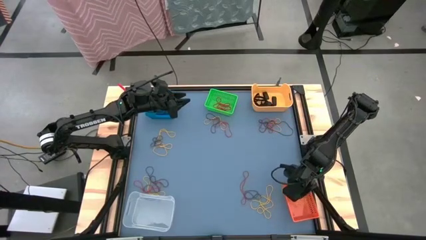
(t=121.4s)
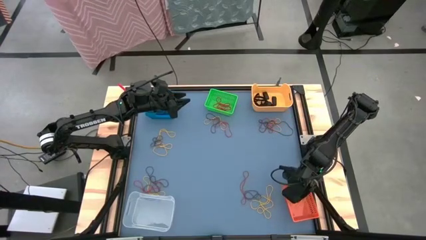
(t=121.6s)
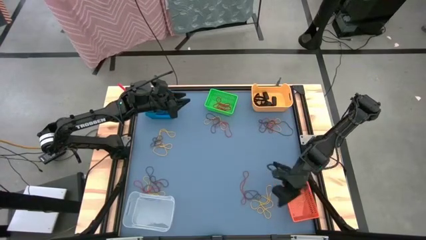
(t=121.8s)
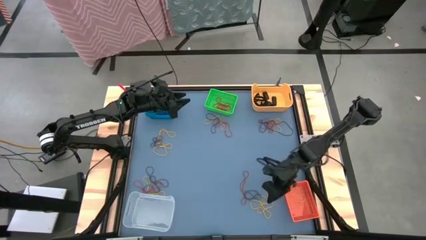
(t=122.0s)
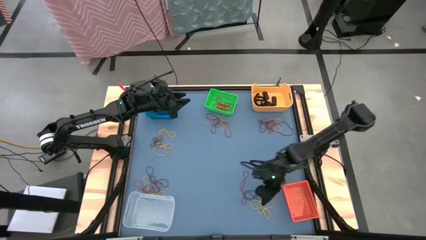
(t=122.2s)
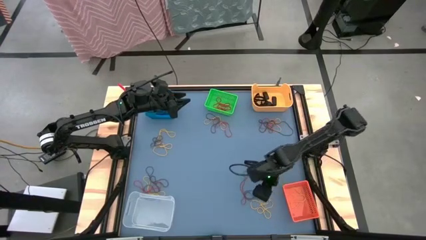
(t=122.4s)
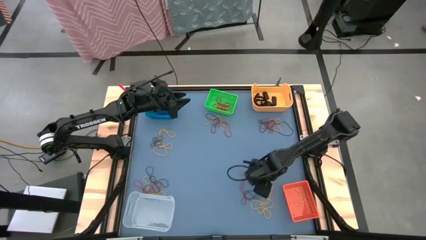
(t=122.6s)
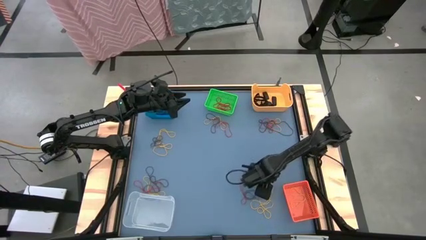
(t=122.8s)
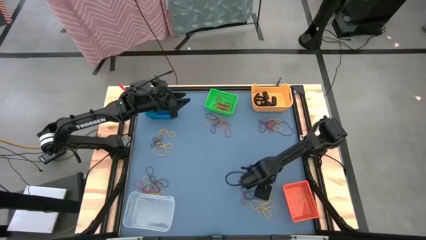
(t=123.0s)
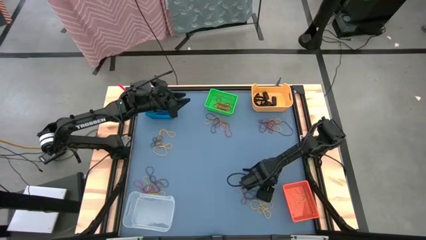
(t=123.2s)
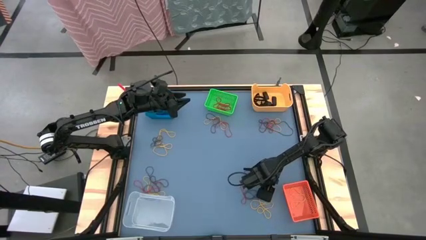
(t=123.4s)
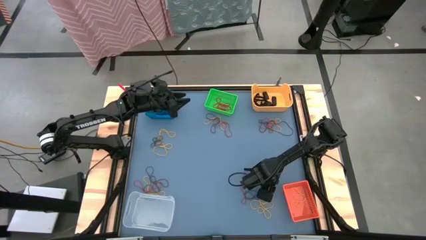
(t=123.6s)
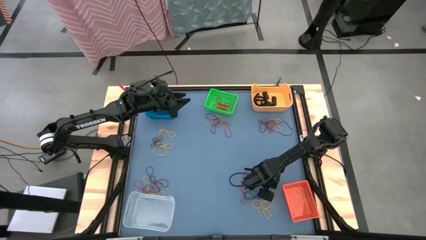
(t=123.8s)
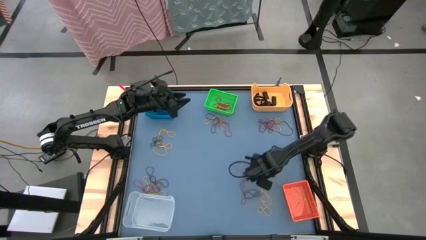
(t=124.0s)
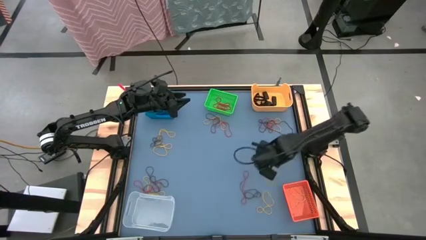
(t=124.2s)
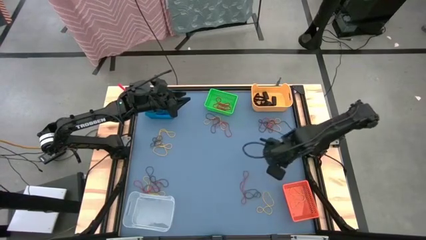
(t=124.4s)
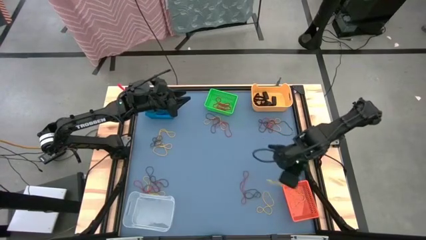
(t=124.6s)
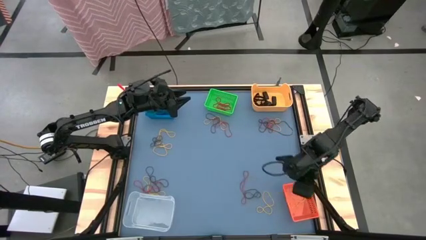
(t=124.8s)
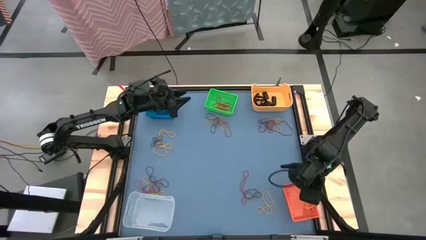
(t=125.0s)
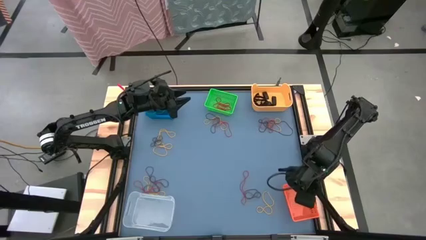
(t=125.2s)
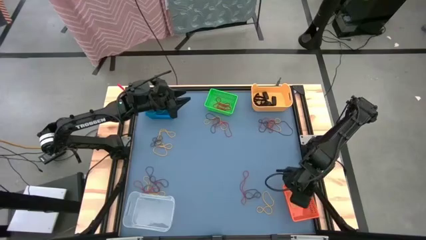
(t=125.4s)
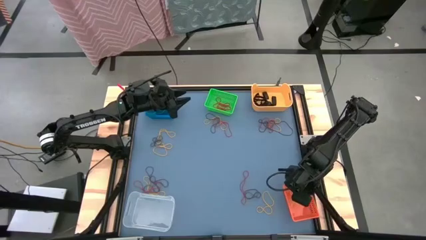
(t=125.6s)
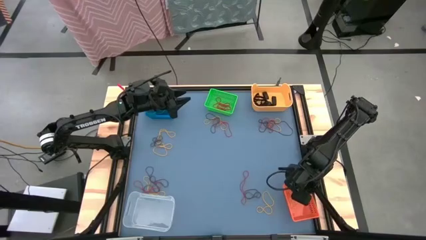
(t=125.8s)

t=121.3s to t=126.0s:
Task: Sort rubber bands into baskets
Put the yellow rubber band into the orange bin

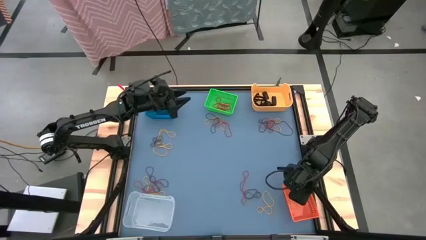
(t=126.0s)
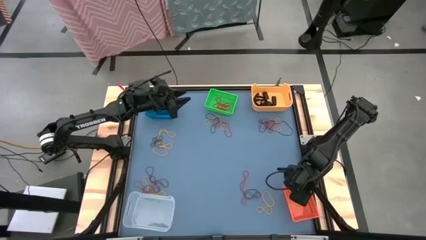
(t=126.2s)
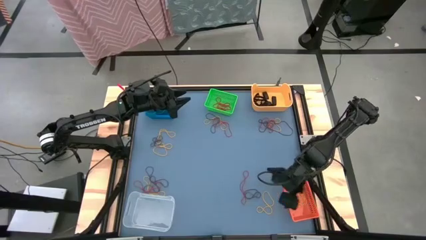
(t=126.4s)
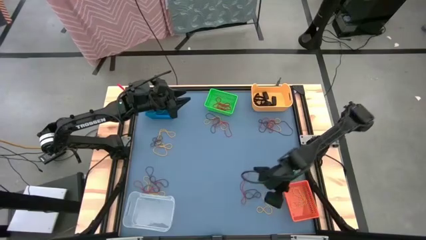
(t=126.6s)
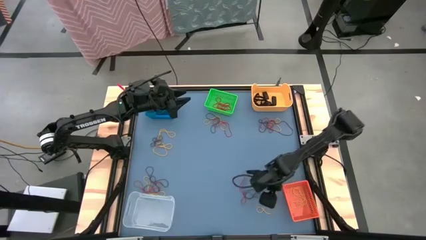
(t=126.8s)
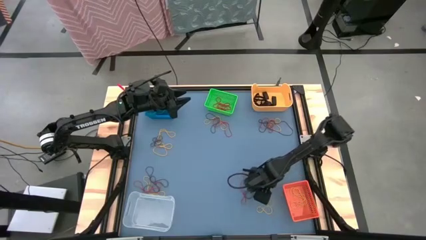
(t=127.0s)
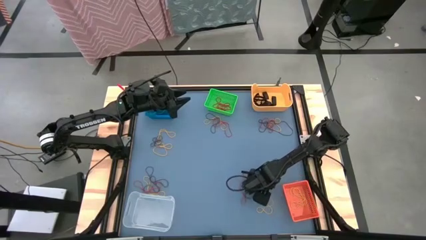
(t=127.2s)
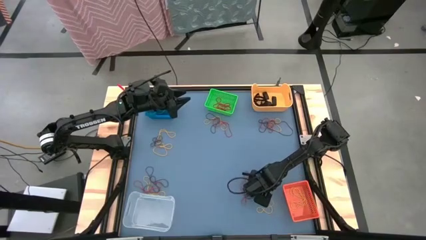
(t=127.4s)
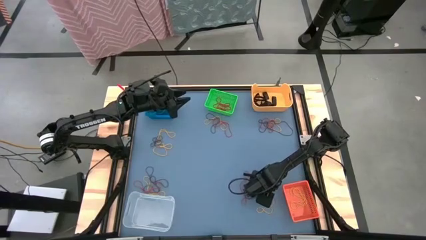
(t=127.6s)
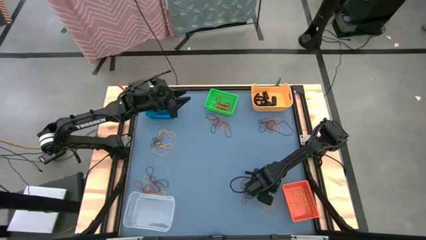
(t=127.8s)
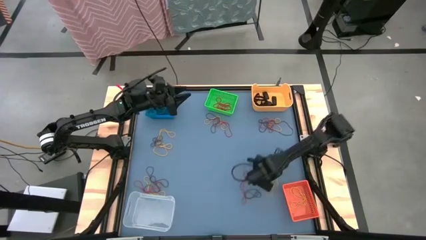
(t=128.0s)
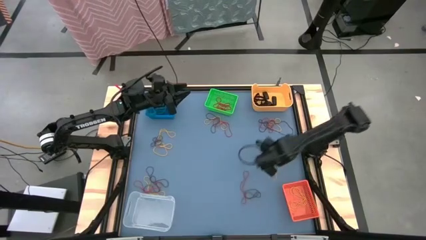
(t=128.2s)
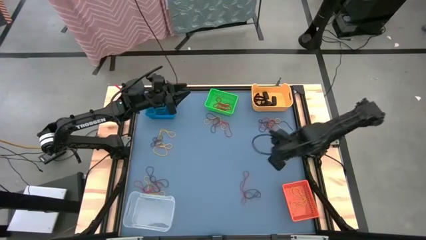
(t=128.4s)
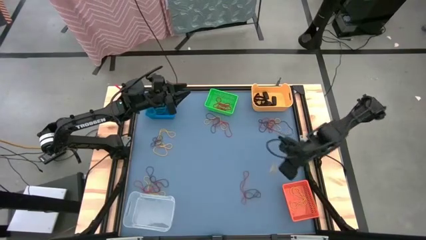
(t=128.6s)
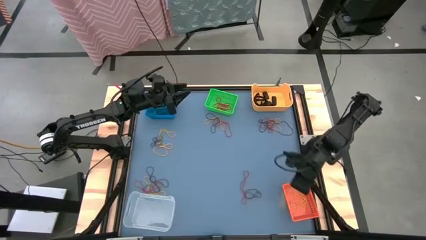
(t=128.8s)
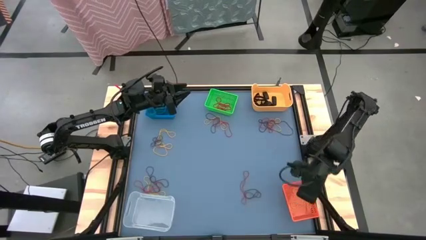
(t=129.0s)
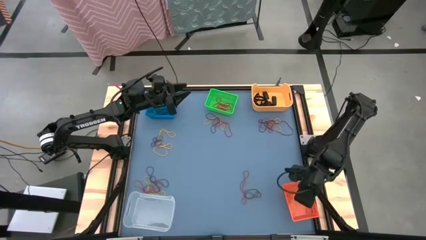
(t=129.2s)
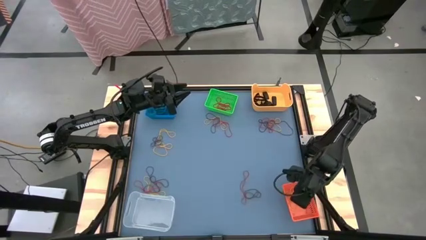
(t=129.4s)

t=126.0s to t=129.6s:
Put the yellow rubber band into the orange bin

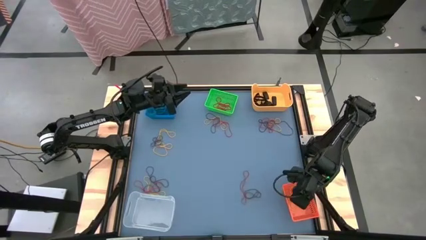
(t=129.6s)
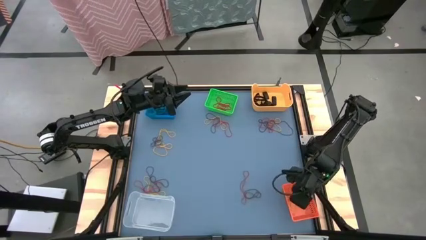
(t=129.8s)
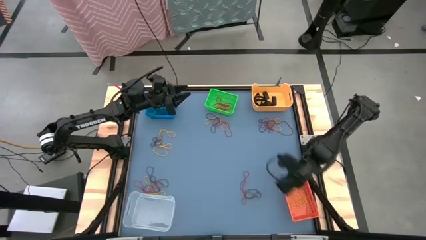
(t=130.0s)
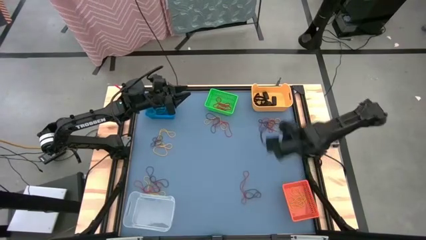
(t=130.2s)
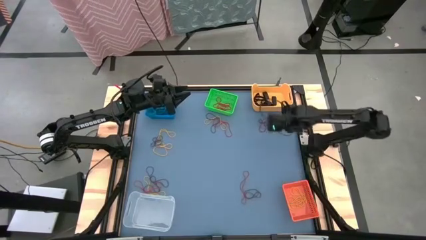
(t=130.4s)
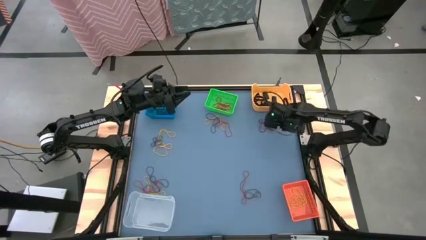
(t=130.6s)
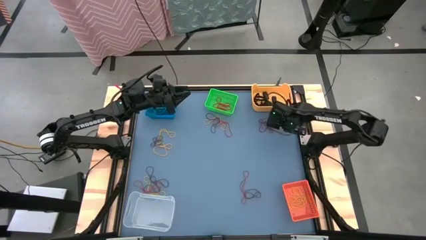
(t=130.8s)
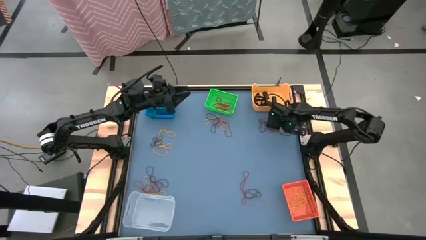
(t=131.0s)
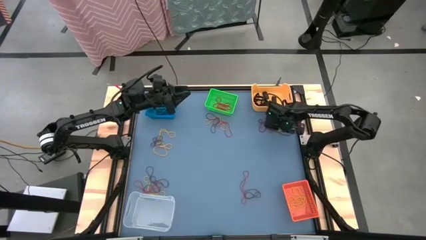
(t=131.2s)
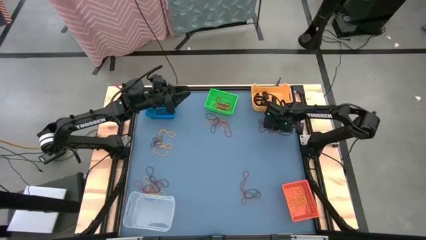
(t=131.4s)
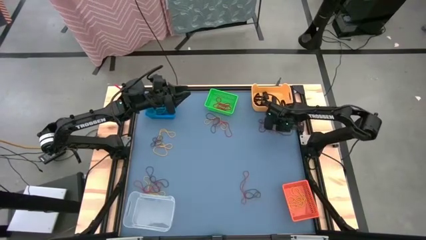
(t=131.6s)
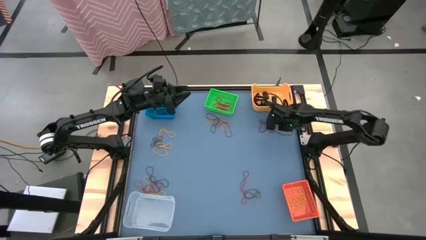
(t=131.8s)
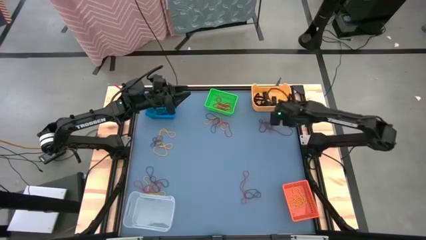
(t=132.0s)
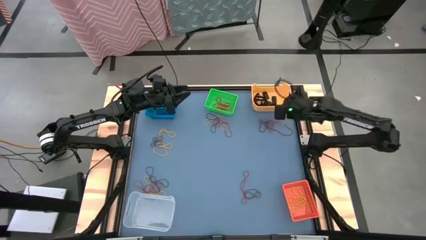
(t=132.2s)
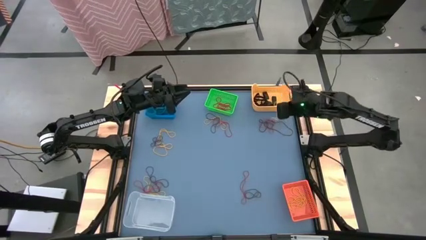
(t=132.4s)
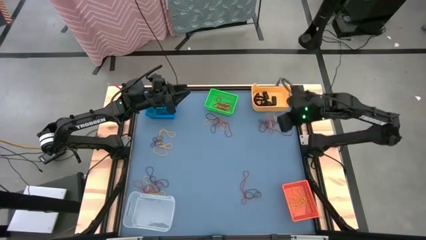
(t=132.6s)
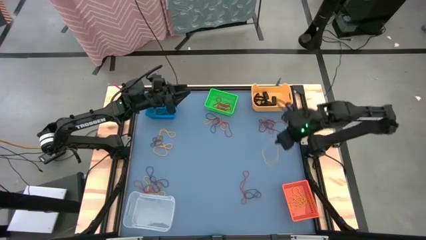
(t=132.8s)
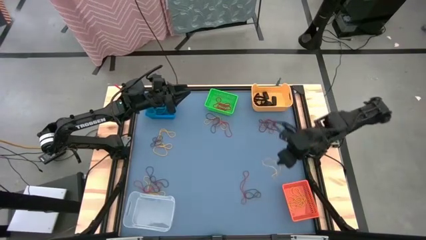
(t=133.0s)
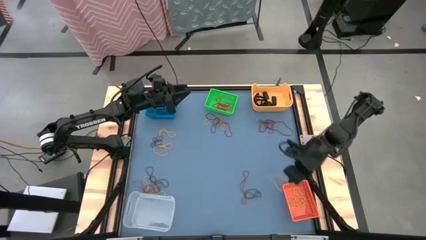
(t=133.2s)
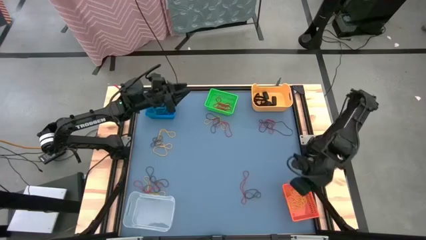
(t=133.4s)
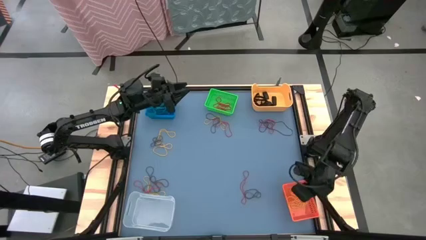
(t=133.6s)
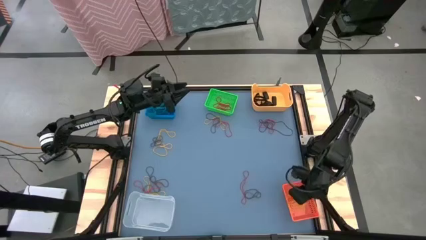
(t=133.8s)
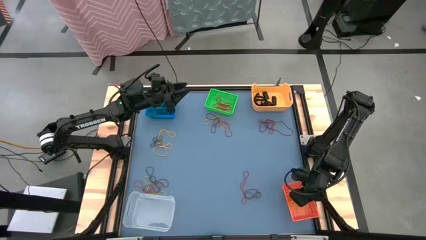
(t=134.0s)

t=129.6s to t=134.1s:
Put the yellow rubber band in the orange bin

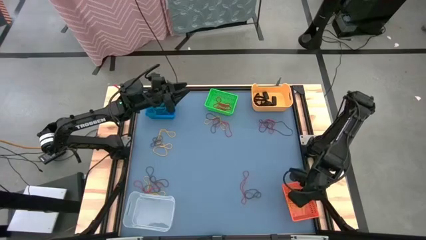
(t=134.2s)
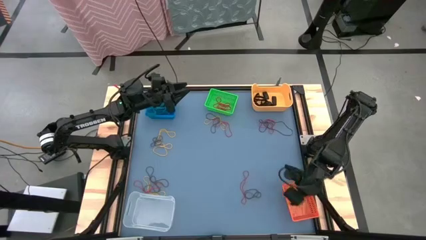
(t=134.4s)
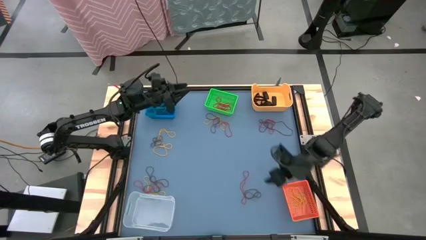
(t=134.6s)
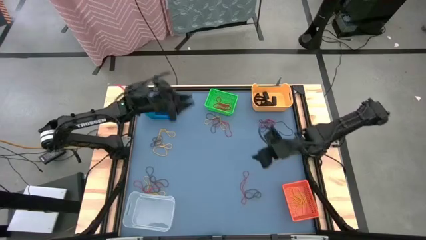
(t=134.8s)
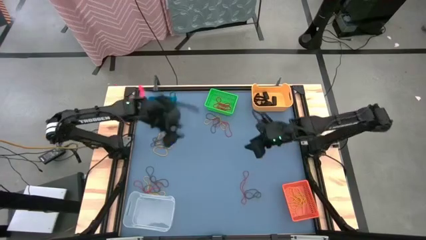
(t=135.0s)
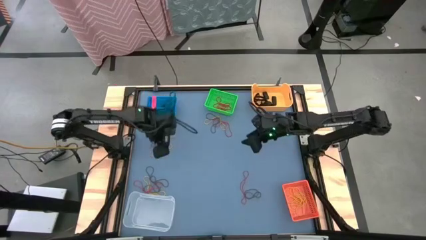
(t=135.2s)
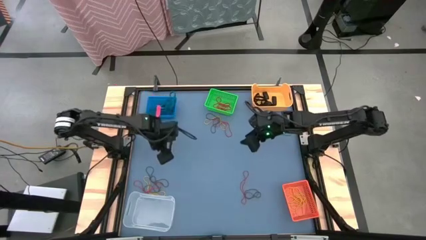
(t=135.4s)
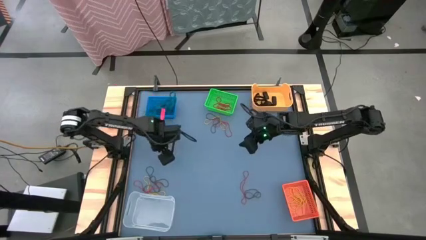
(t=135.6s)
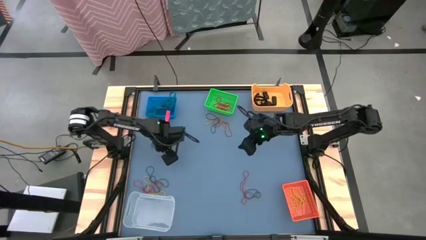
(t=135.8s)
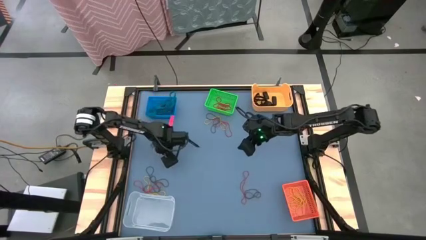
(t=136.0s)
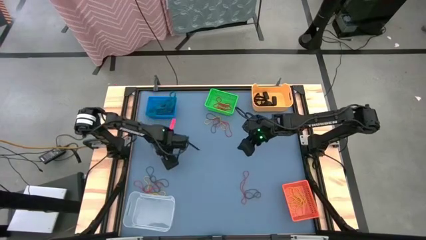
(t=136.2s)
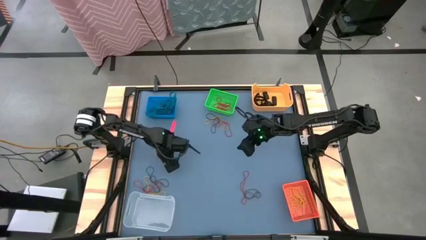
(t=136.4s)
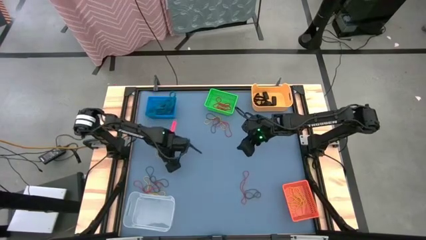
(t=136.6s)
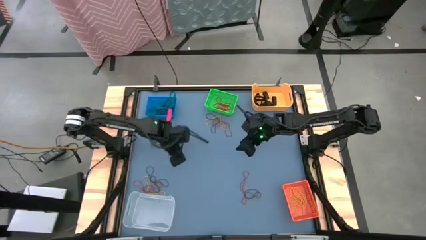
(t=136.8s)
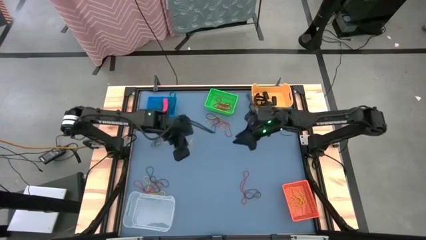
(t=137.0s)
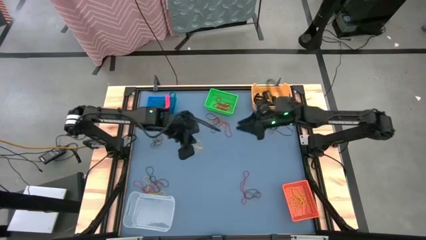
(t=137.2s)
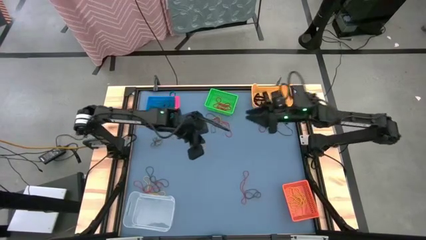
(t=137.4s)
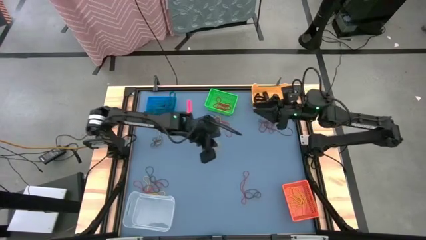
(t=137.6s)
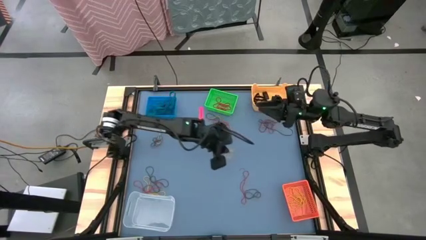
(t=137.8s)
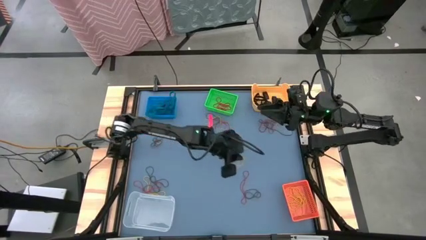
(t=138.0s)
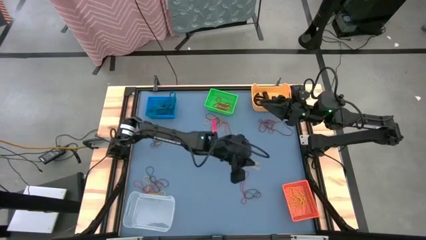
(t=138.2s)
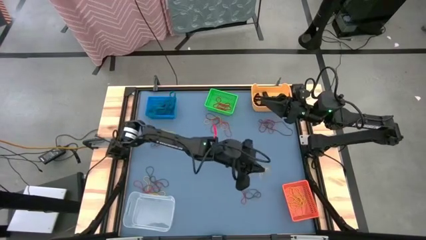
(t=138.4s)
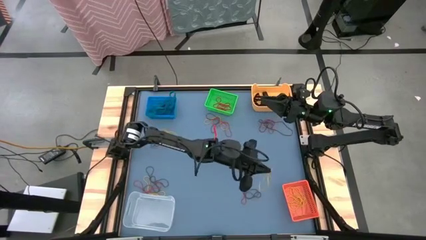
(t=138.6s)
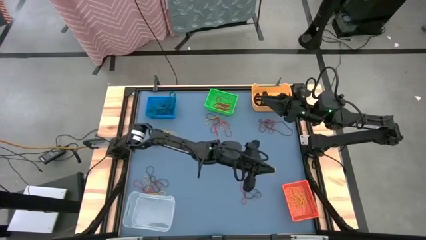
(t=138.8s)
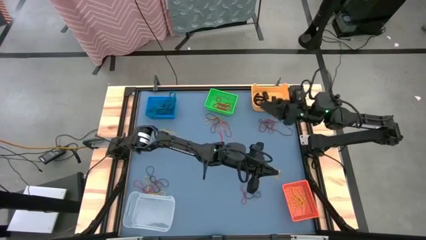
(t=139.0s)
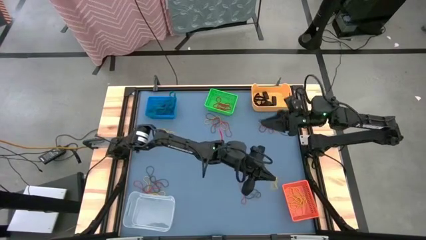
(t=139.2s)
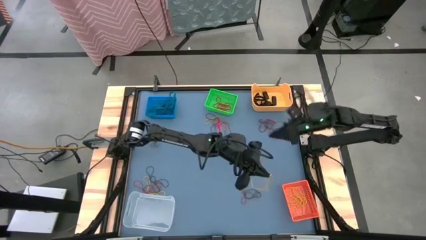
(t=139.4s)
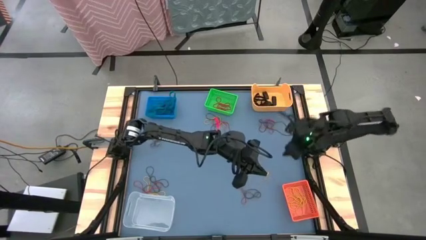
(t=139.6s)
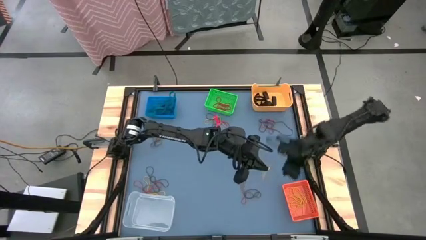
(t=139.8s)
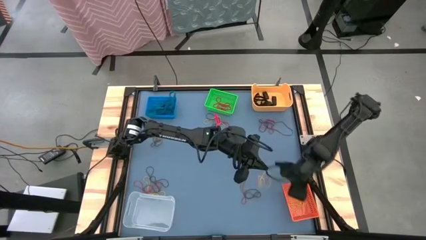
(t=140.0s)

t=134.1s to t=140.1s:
Put the yellow rubber band into the orange bin
